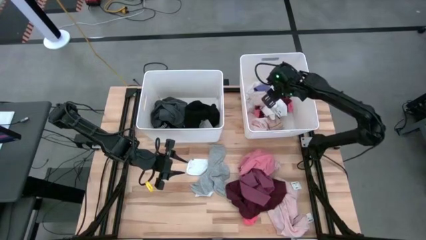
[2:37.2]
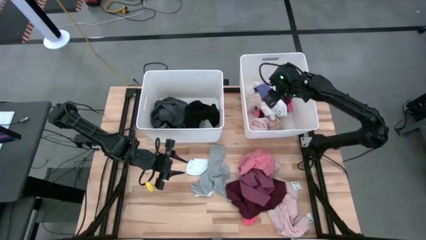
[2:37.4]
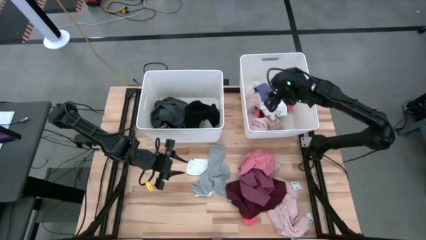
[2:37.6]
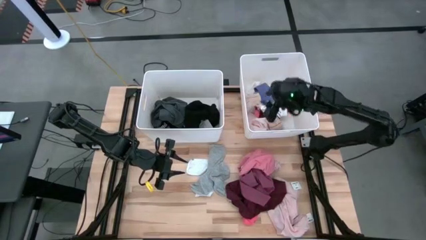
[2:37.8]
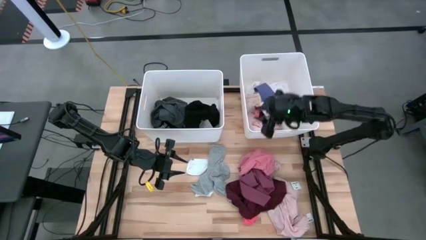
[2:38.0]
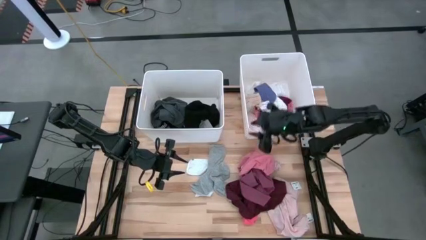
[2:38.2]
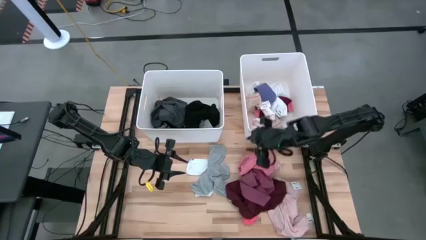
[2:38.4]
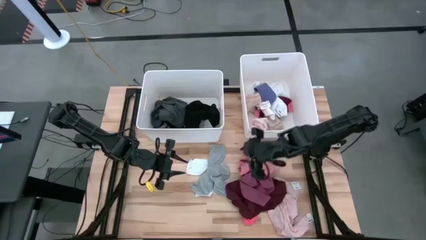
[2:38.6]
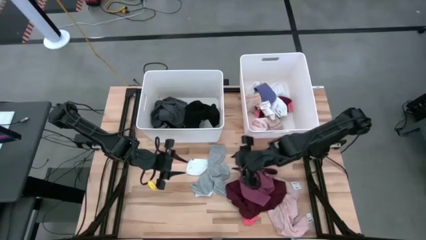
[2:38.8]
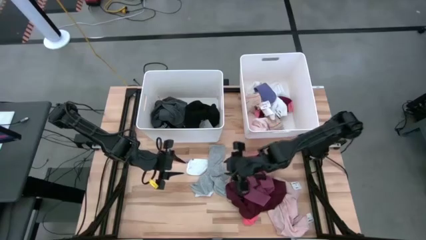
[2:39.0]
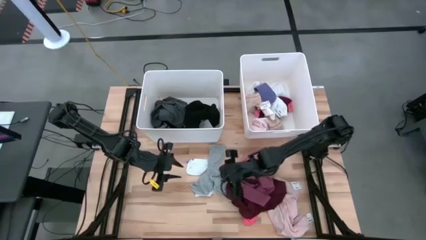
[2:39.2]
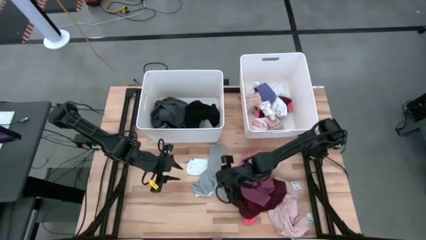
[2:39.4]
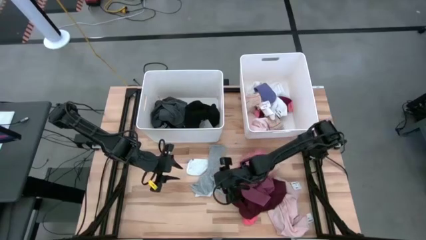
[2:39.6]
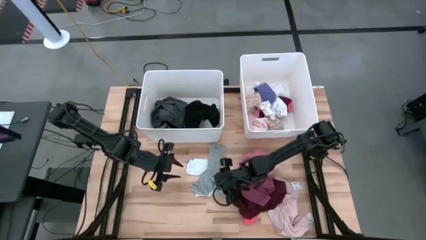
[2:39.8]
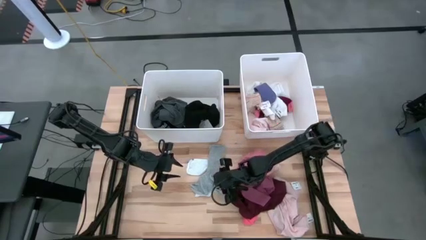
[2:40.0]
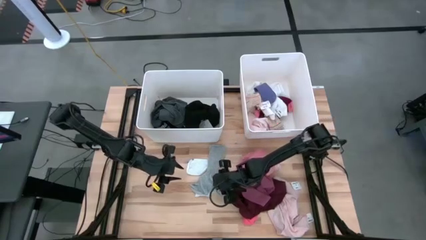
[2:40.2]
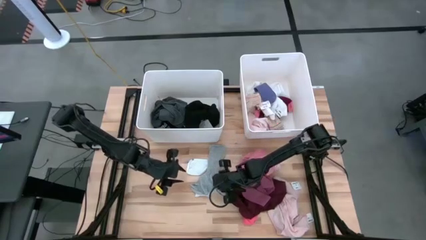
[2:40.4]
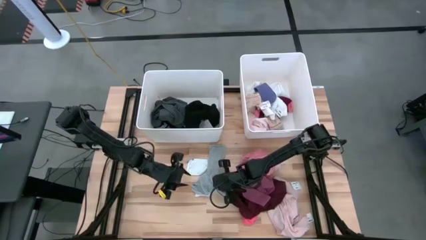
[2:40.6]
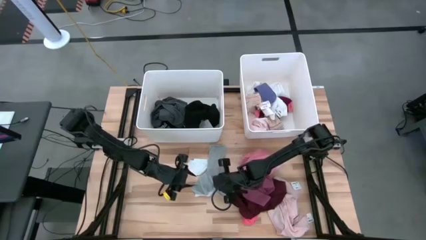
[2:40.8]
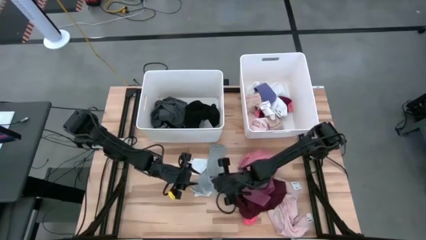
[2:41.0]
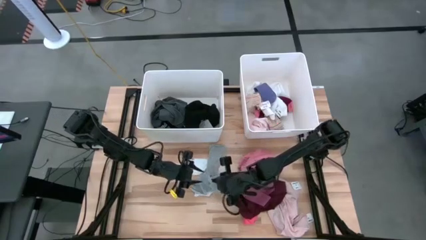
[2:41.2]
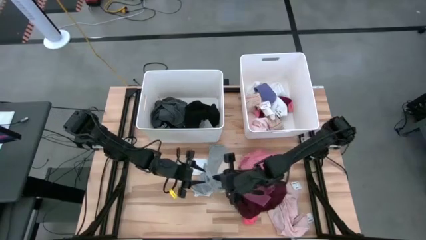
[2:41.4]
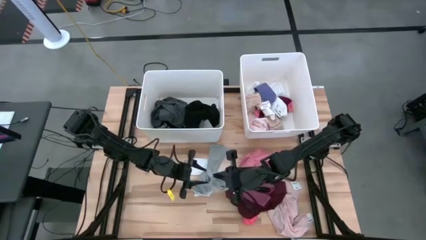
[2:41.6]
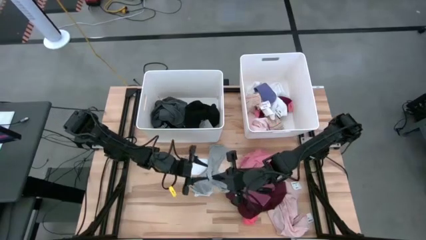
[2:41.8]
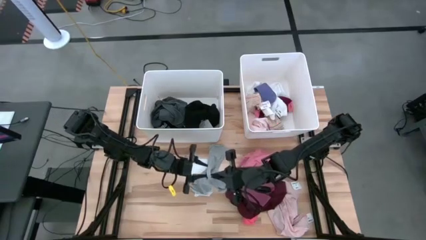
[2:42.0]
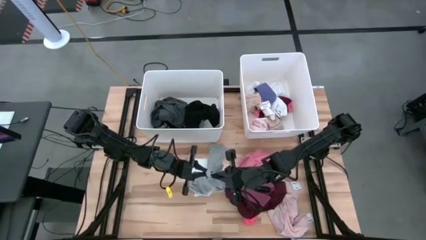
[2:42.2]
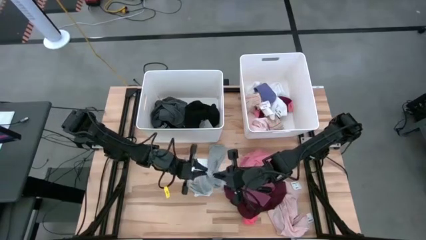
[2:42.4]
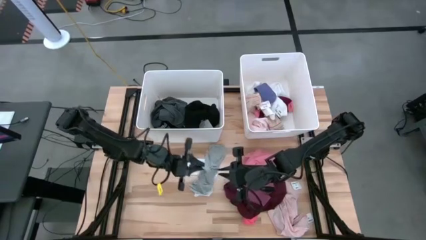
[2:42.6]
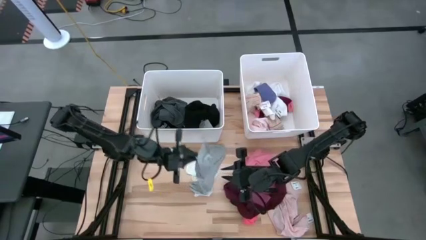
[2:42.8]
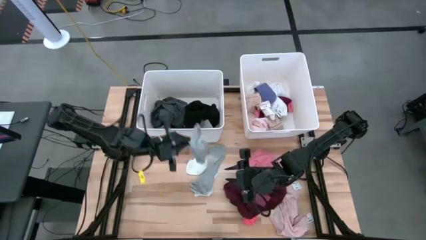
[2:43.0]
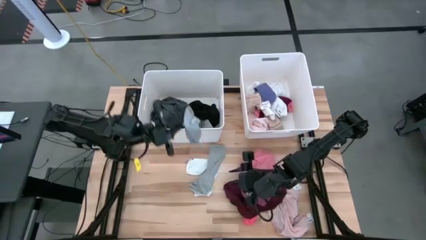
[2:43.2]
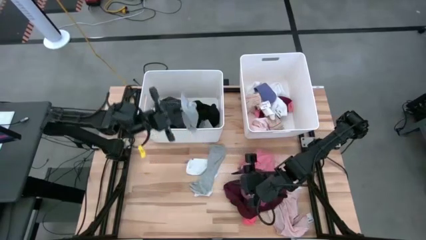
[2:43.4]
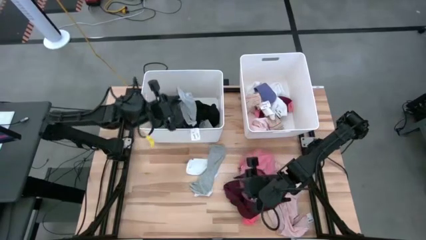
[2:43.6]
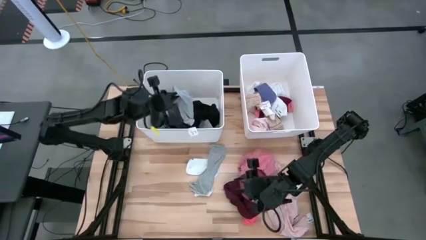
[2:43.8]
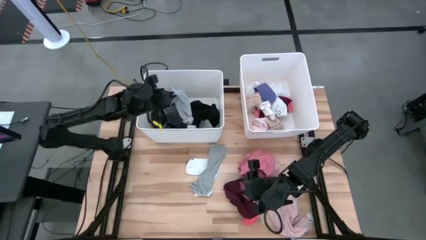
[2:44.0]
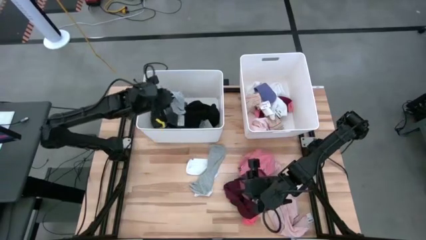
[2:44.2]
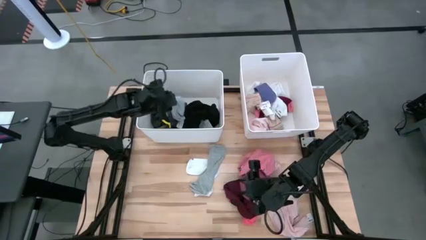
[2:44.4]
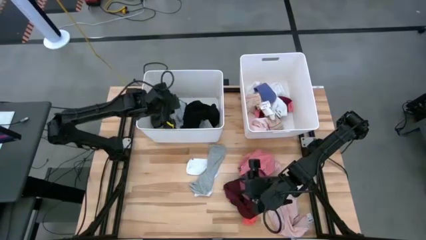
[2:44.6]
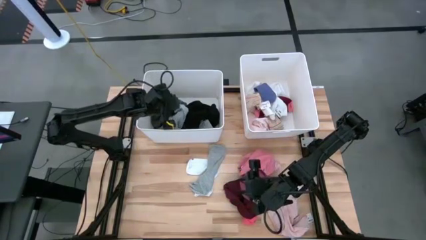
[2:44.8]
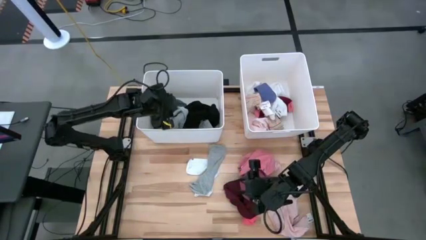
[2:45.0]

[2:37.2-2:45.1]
Task: Sort clothes
Put the gray sock into the left white laundry organizer

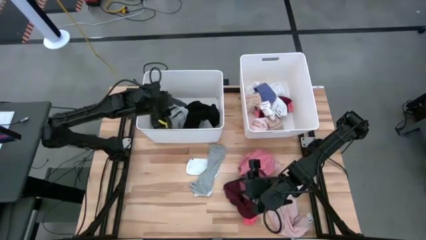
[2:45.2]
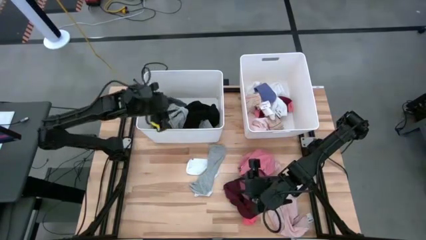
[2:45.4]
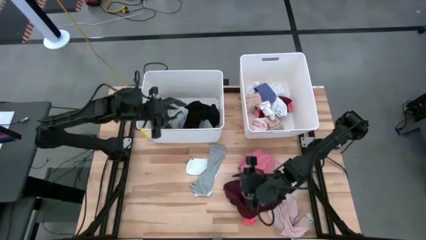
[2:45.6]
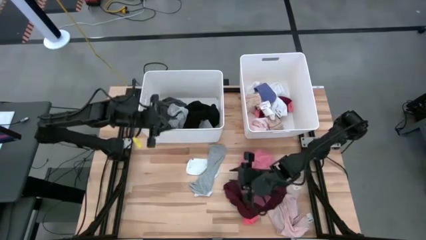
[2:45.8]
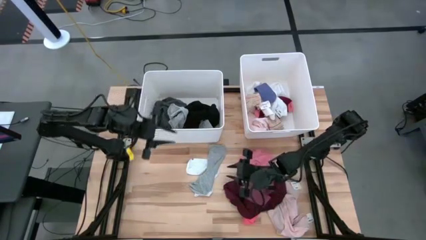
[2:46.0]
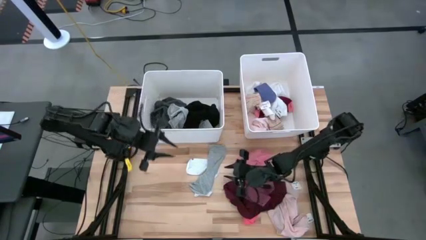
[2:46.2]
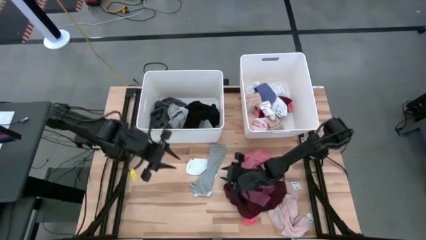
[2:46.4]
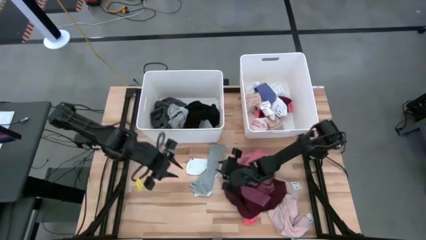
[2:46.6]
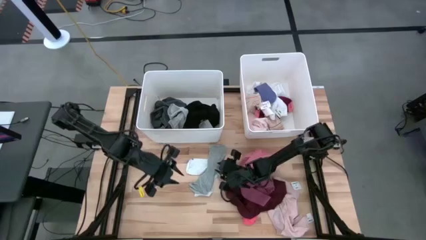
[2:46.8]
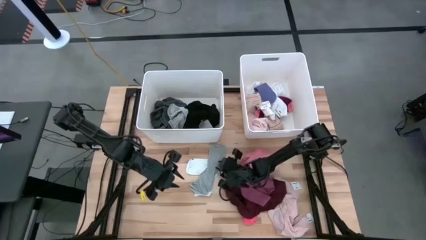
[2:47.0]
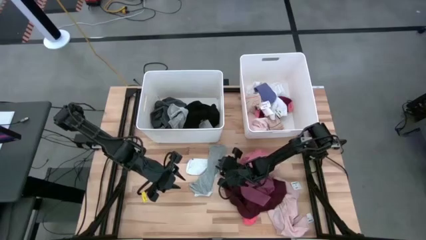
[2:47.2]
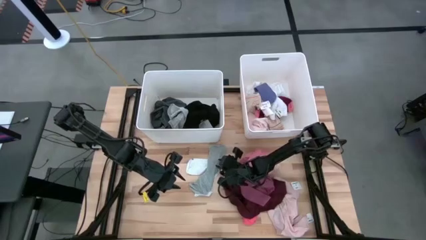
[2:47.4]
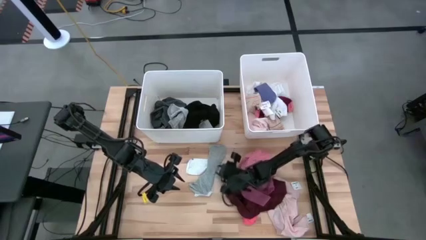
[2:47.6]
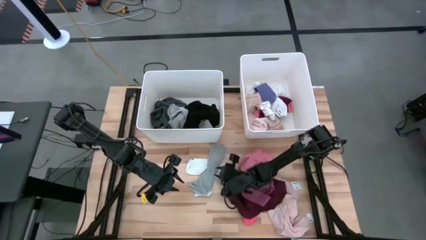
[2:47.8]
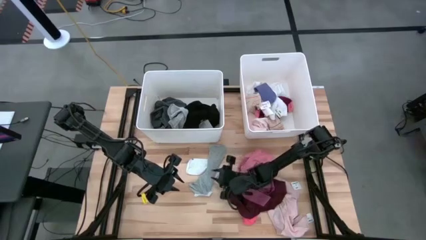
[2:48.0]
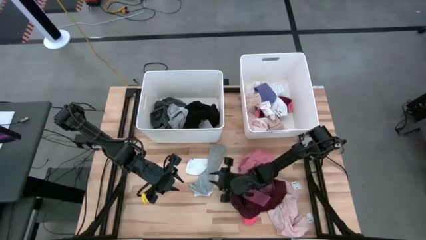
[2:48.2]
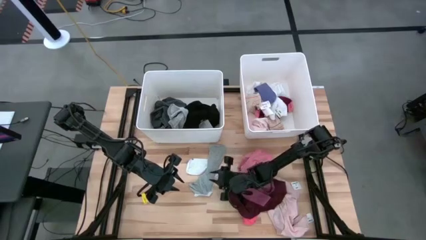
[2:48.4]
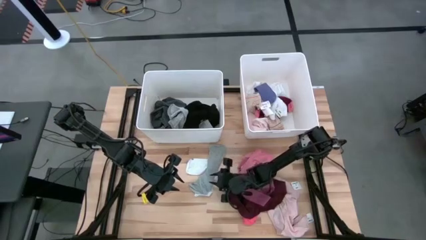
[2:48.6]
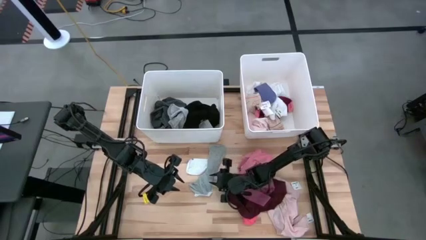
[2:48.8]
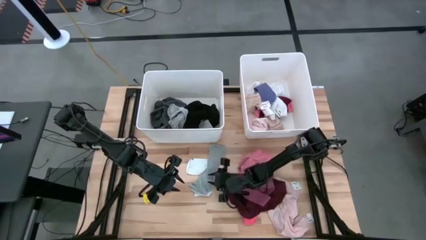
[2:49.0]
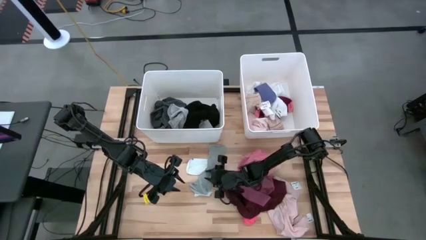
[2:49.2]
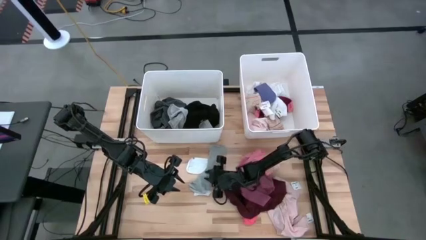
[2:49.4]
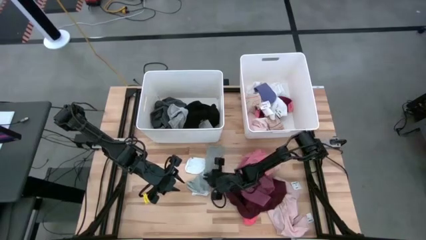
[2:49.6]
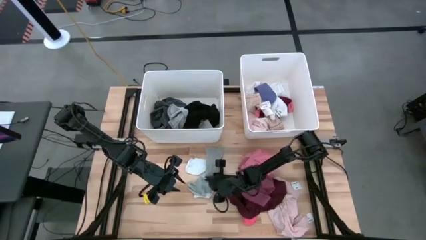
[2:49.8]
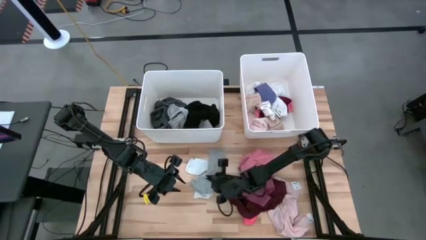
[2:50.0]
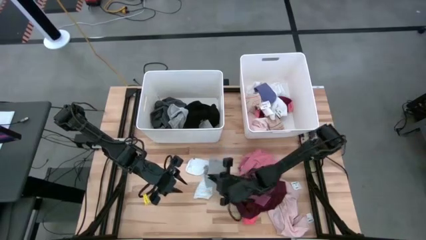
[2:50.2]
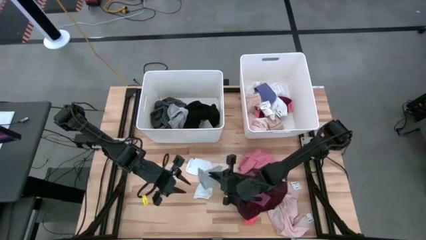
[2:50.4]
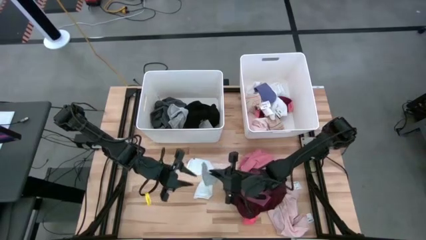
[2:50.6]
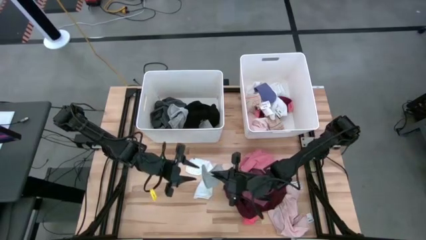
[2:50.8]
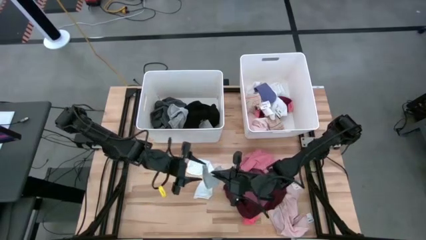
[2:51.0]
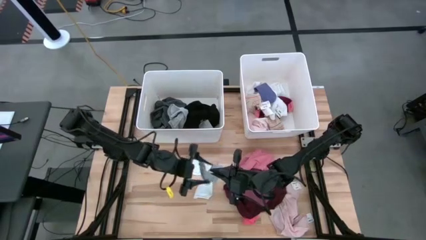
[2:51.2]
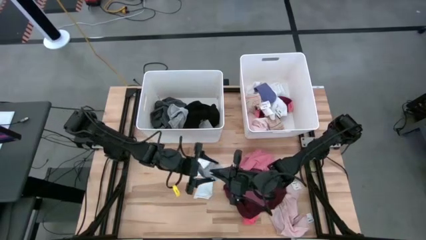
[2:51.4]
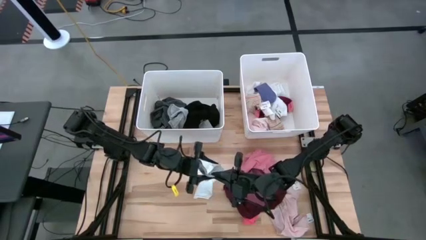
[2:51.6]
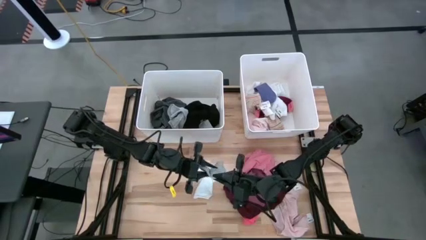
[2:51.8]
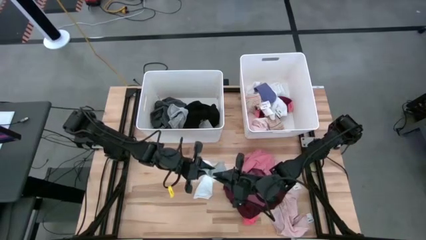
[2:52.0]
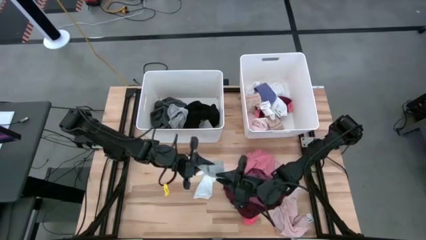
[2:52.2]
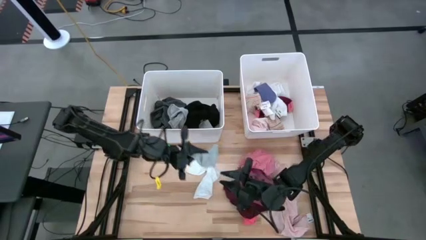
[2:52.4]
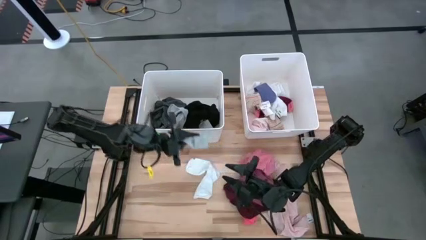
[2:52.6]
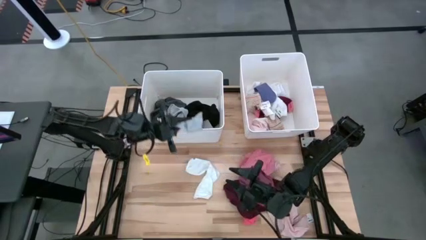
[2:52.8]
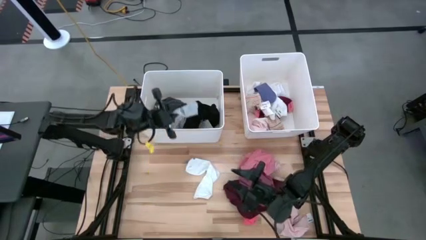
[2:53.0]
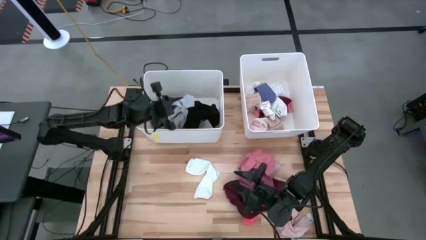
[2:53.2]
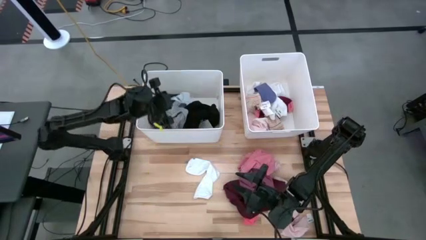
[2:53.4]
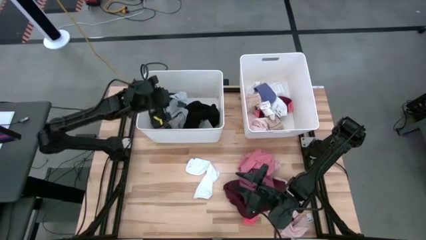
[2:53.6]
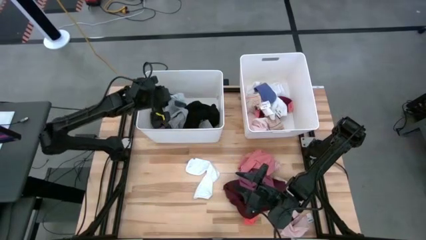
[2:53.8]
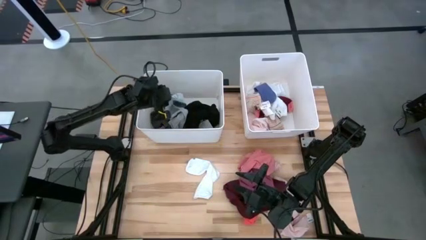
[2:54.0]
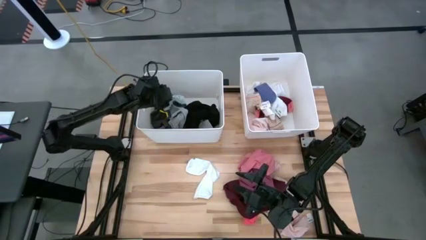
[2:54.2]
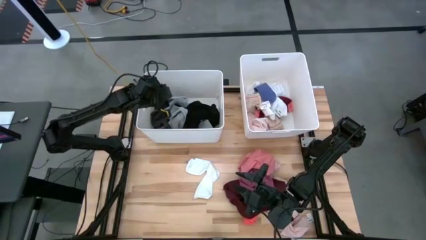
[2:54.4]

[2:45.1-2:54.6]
Put the gray sock into the left white laundry organizer
